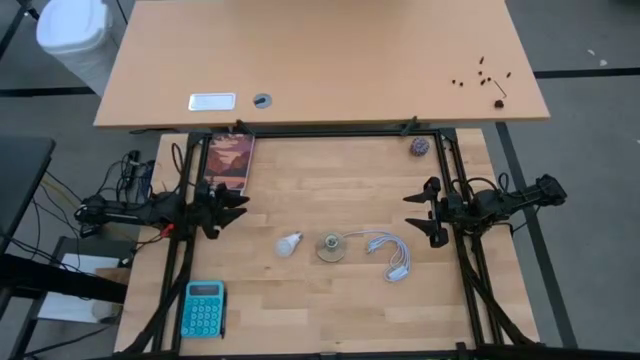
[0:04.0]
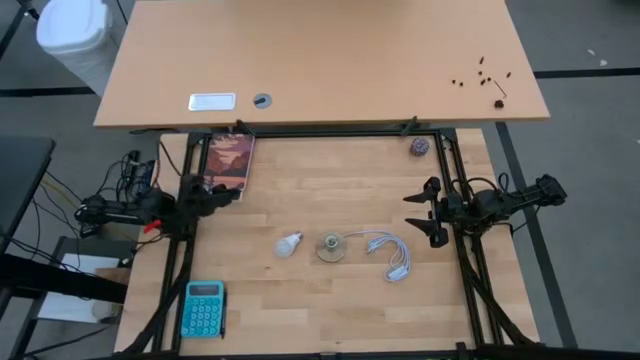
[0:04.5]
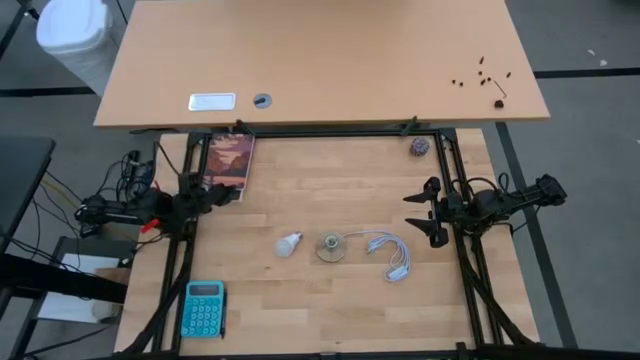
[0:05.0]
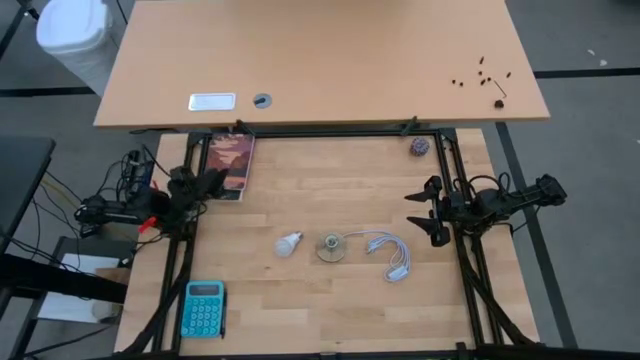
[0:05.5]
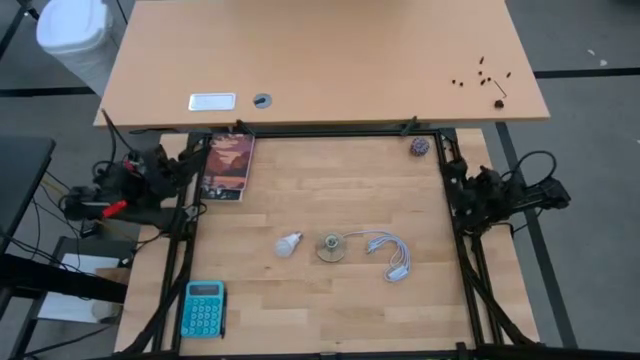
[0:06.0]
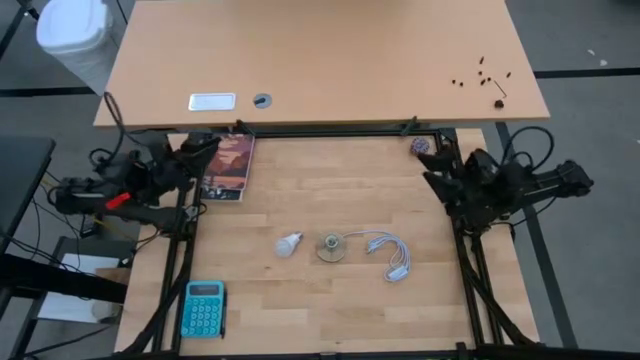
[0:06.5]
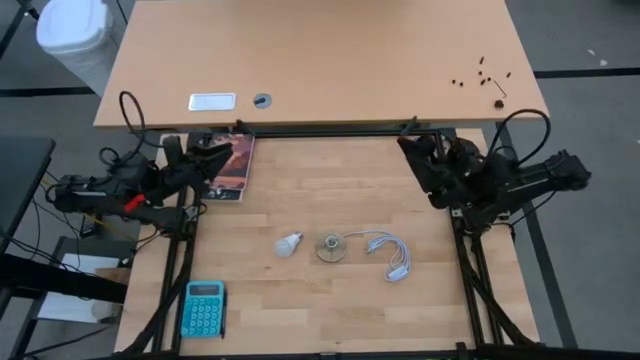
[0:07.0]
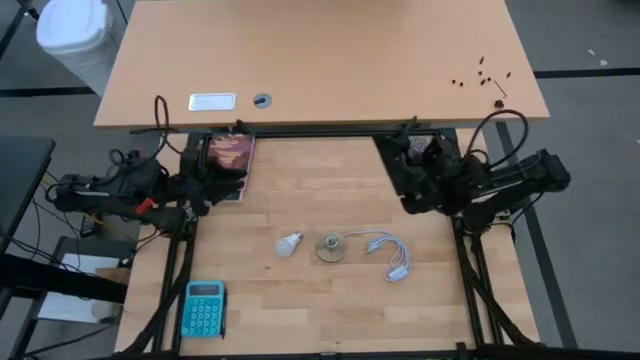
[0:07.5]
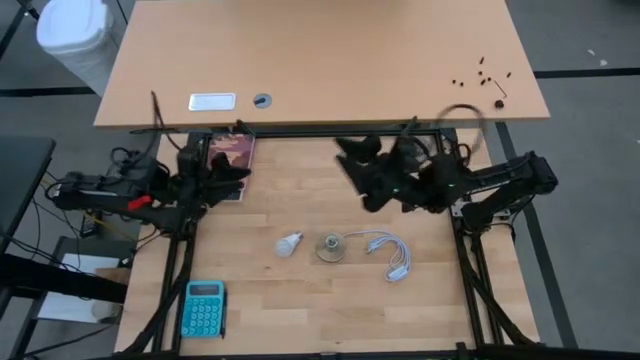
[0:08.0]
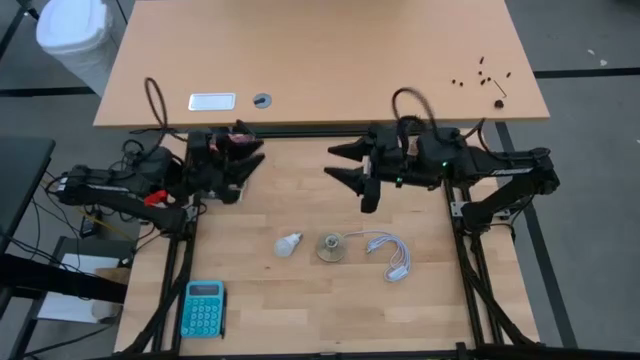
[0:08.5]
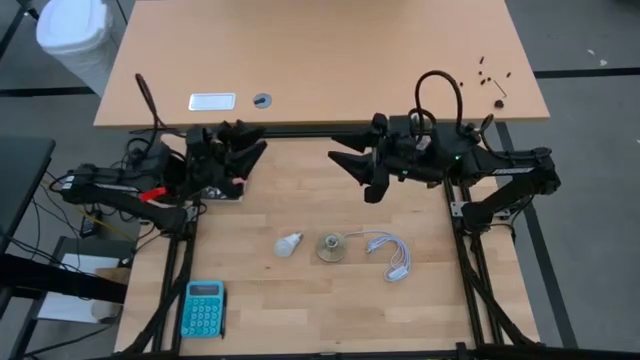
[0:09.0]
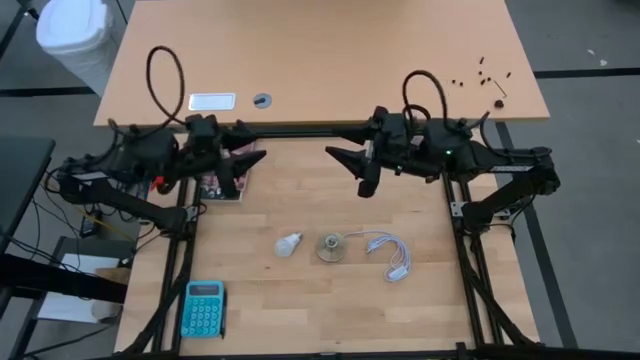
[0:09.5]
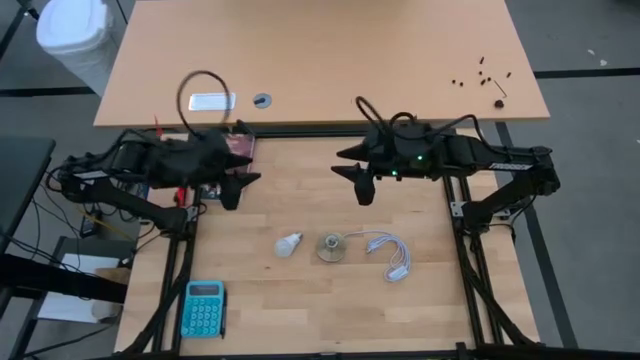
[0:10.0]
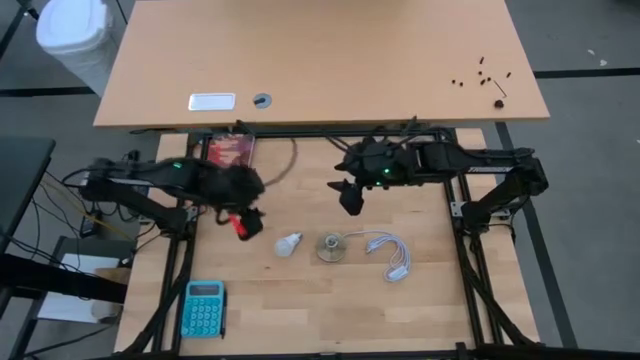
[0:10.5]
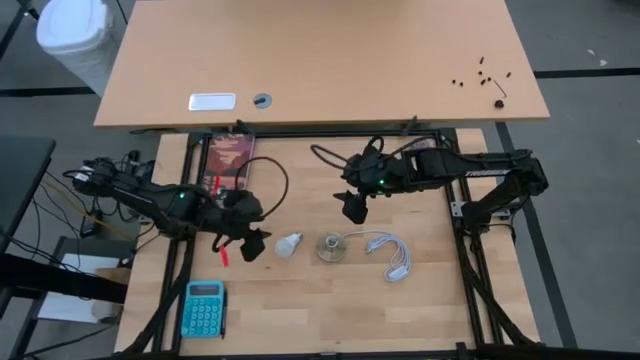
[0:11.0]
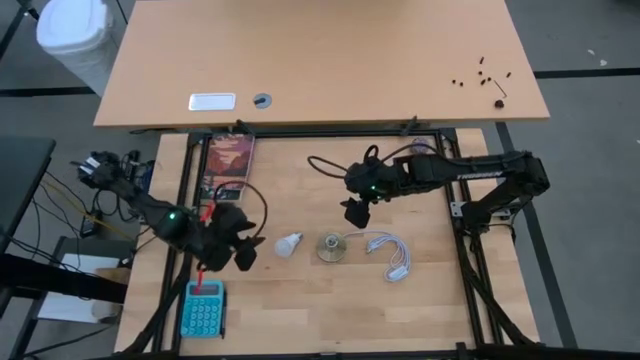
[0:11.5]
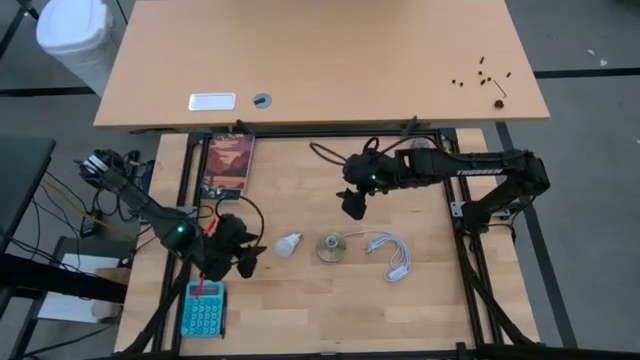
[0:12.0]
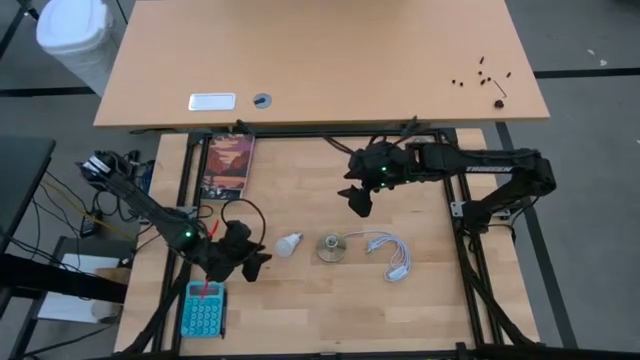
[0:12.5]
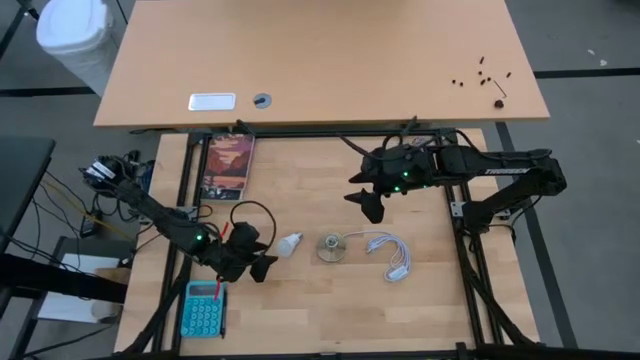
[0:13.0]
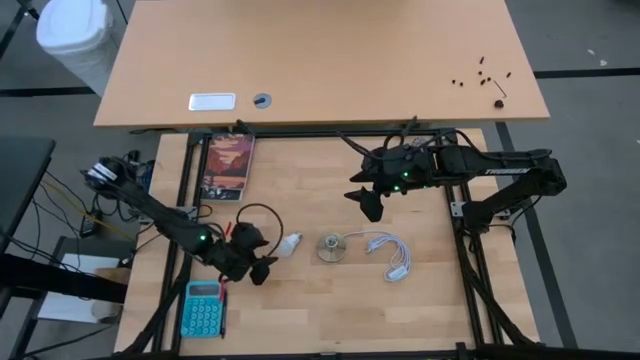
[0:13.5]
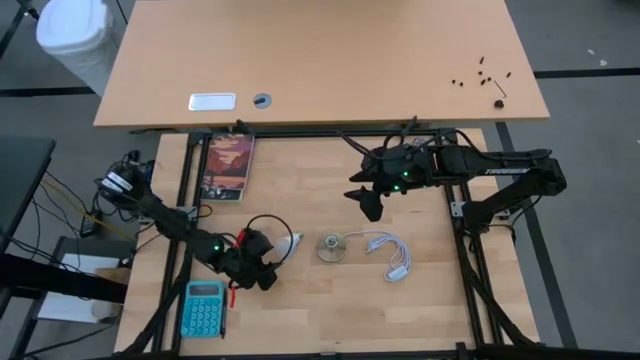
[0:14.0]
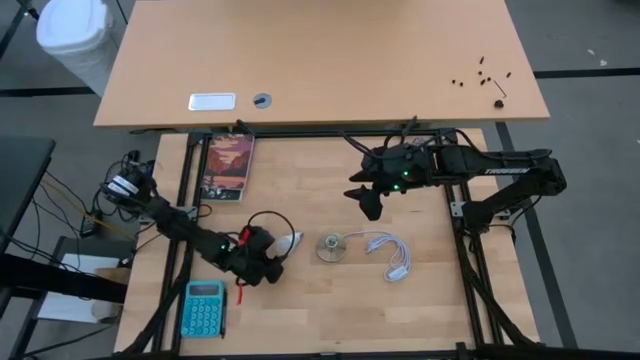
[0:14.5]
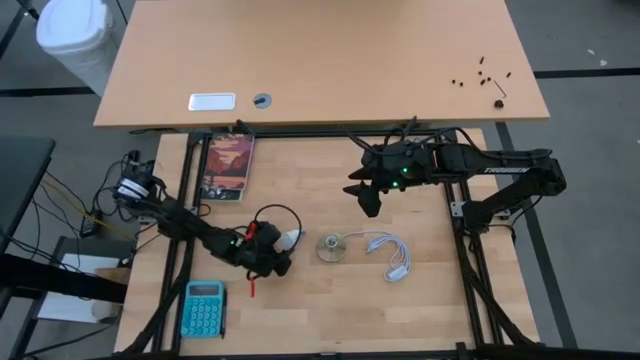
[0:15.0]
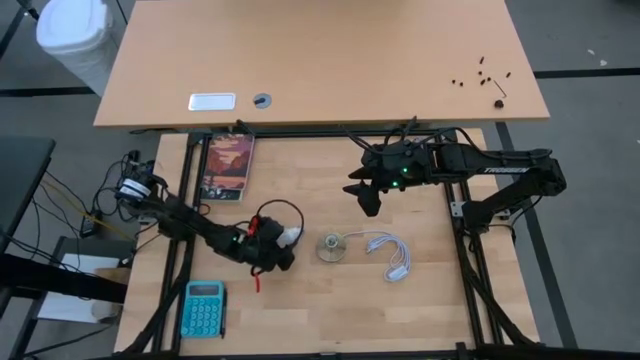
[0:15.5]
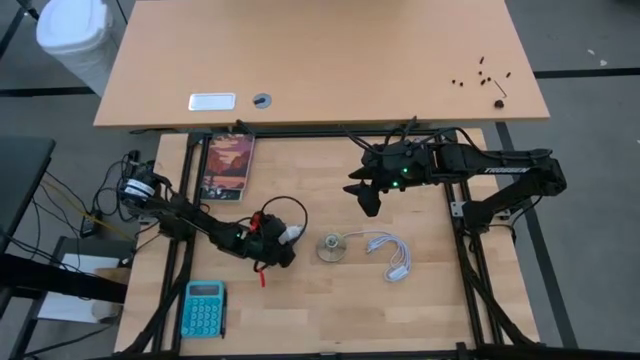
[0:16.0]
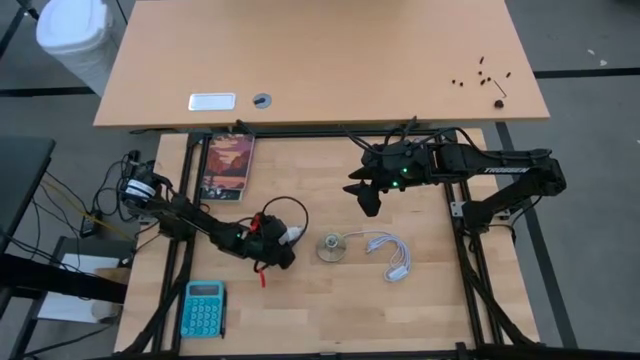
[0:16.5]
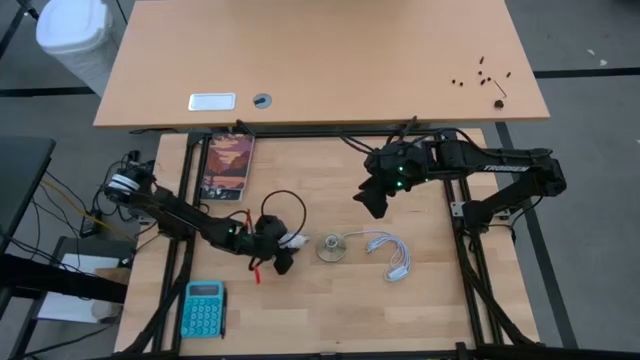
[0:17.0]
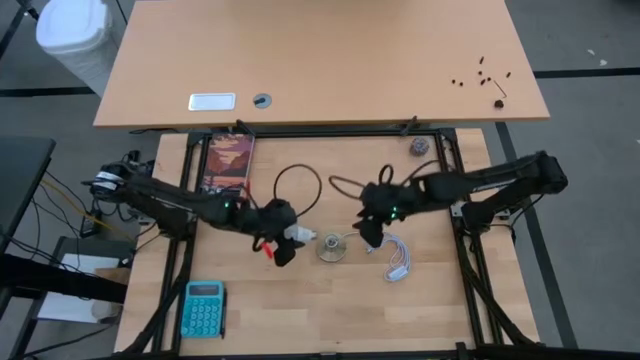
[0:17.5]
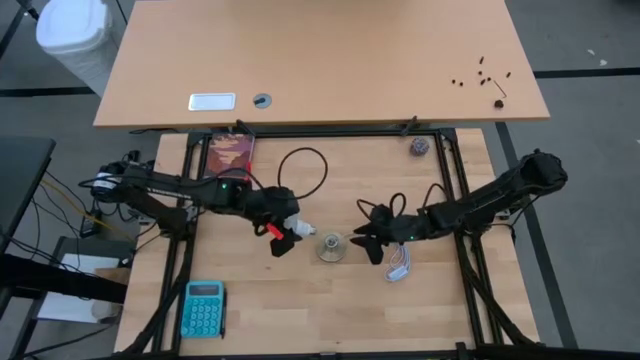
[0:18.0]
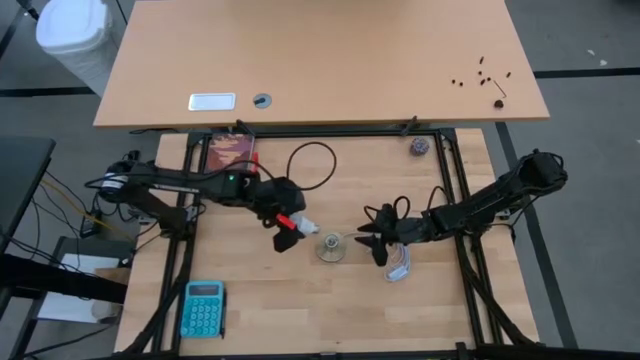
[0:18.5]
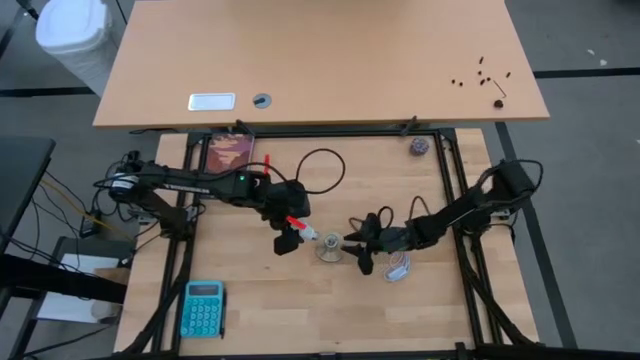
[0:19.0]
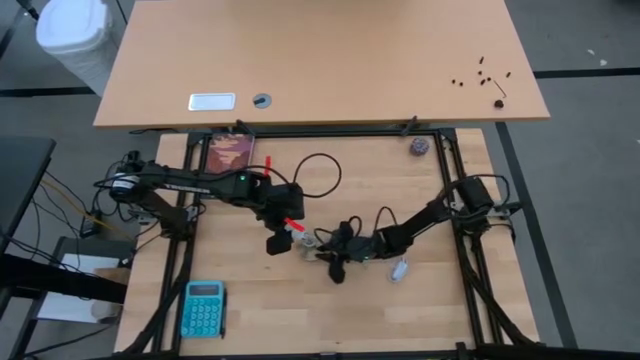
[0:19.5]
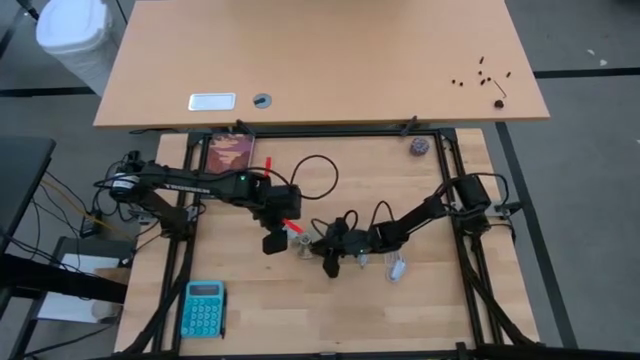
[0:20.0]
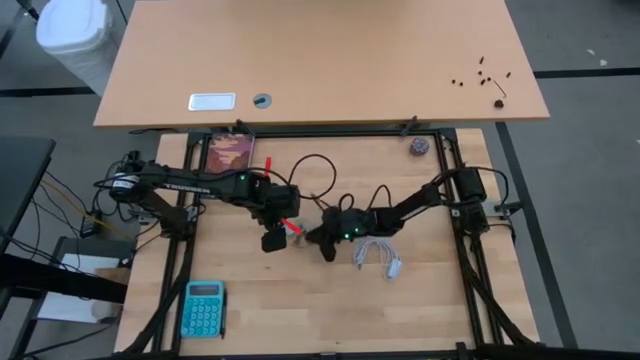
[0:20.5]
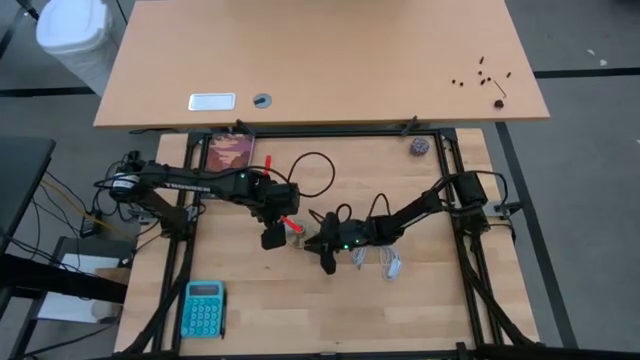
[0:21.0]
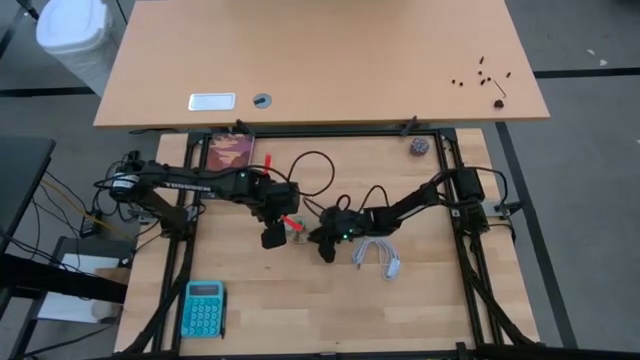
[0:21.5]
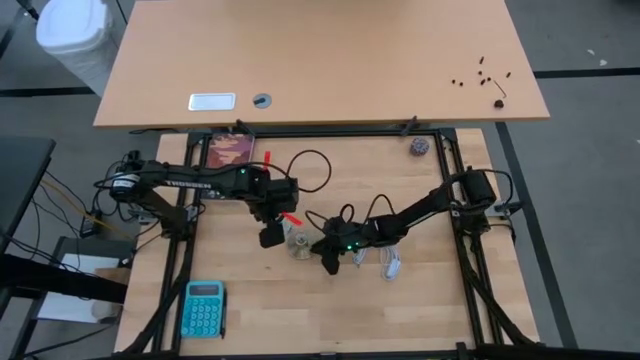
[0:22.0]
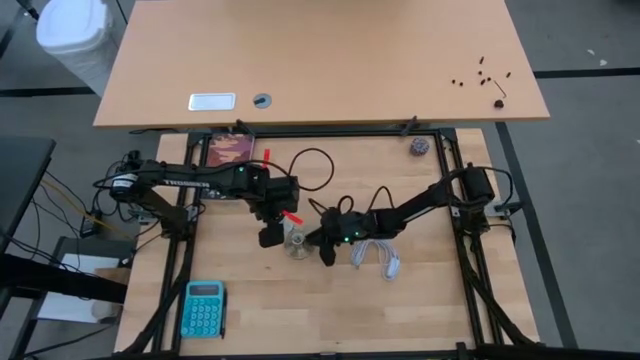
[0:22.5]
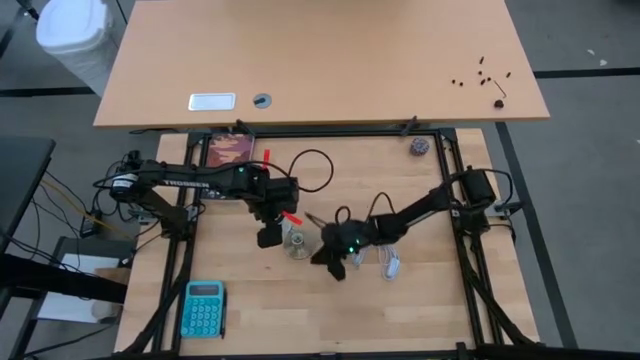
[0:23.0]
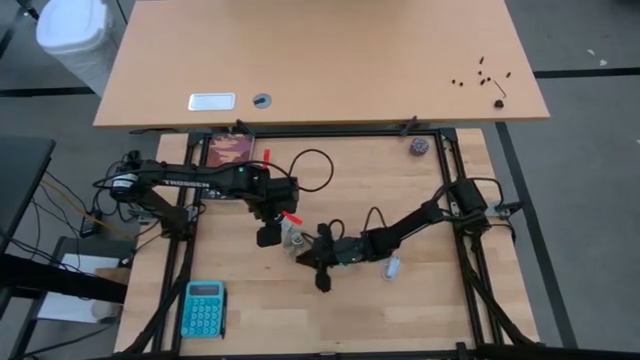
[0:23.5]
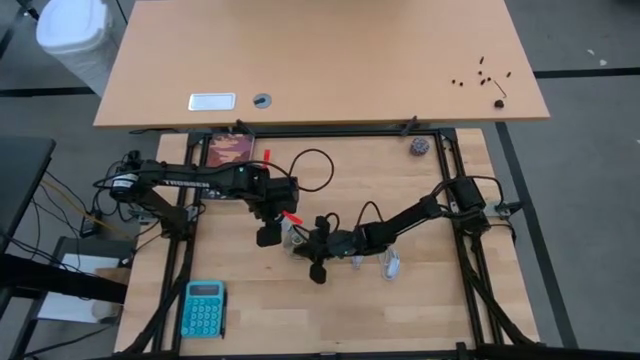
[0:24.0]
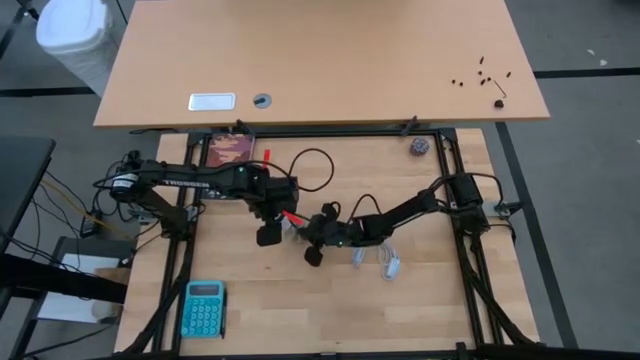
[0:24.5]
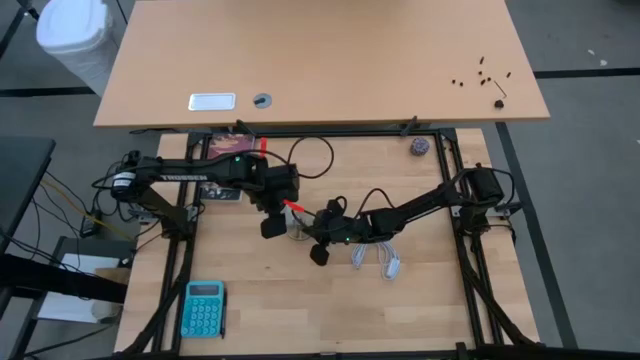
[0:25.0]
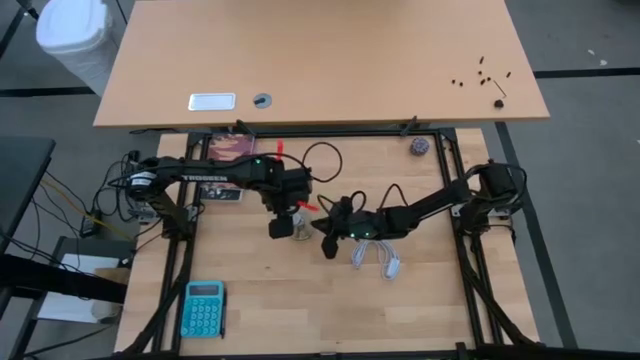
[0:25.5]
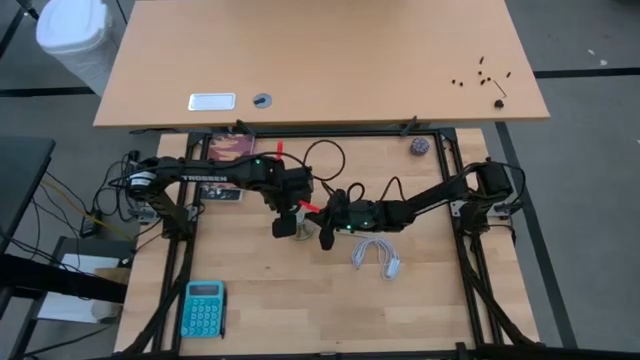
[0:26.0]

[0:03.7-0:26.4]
Task: Screw lightbulb
Insert the white lightbulb into the lamp
